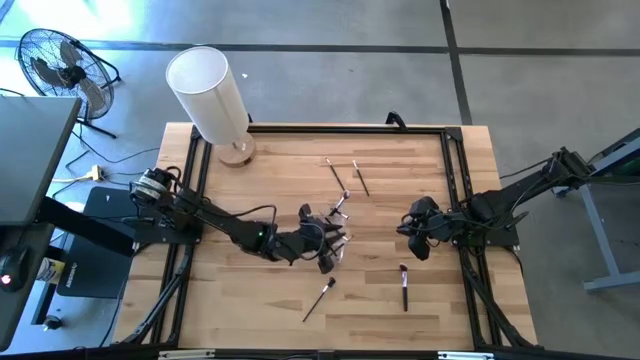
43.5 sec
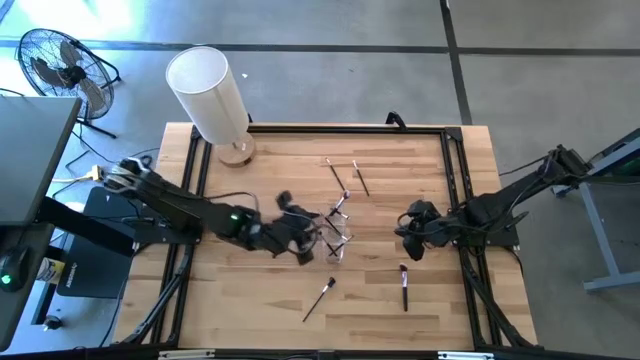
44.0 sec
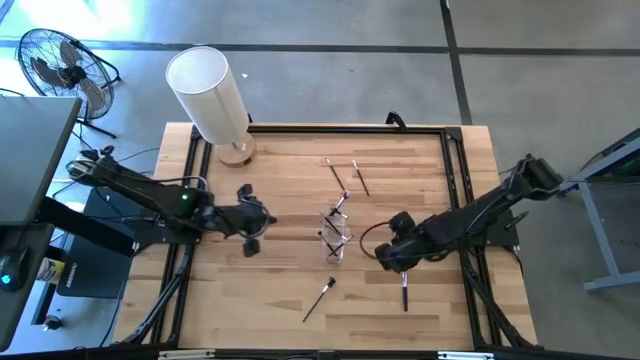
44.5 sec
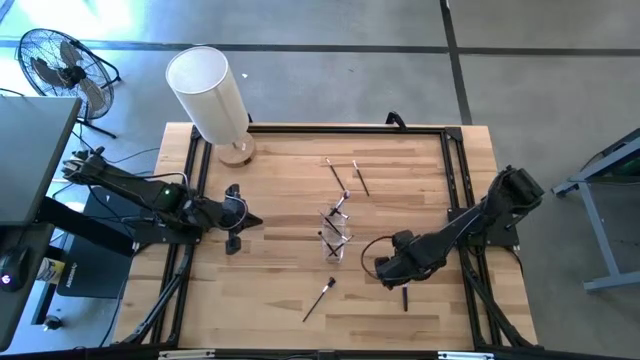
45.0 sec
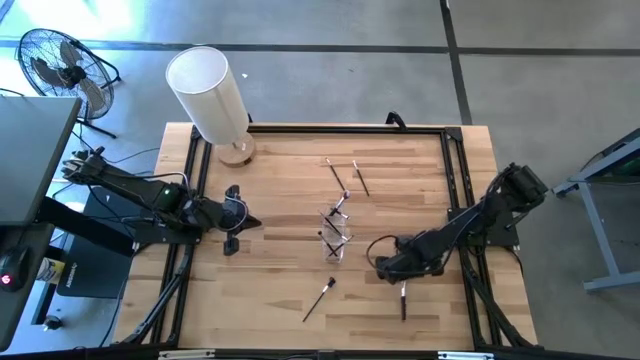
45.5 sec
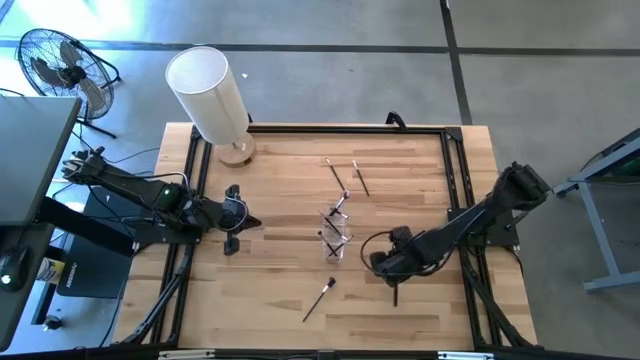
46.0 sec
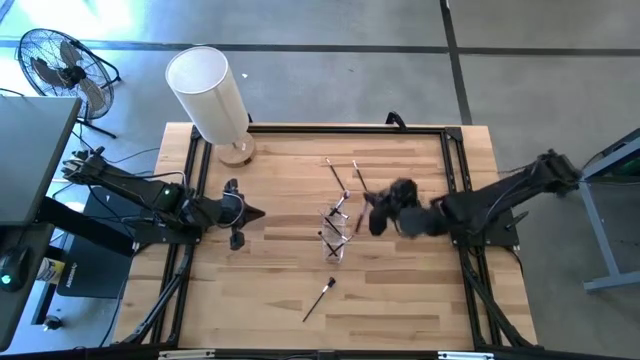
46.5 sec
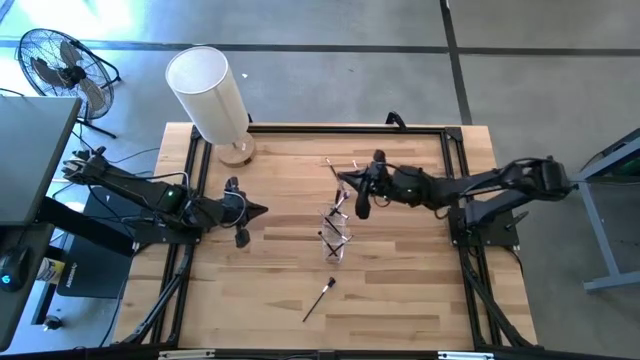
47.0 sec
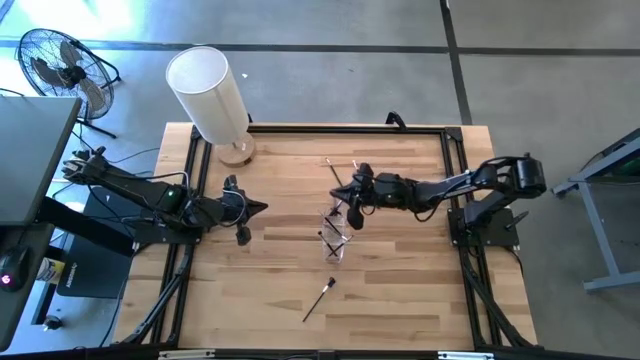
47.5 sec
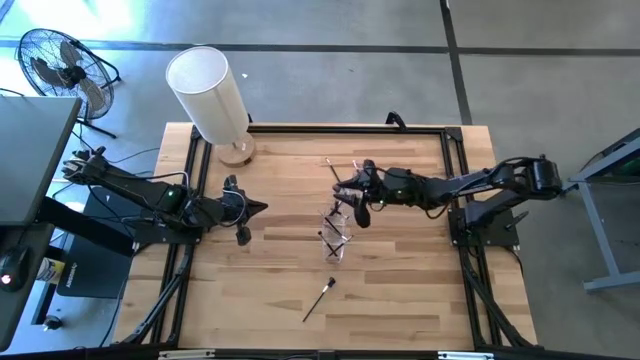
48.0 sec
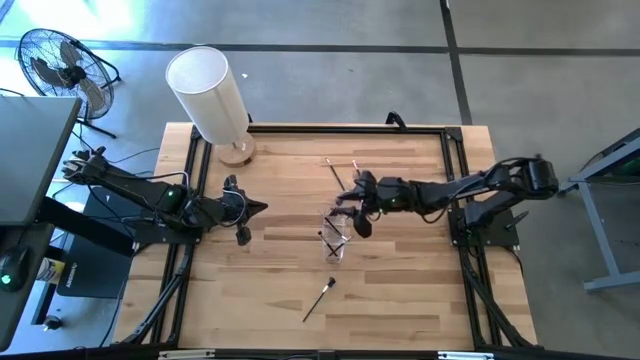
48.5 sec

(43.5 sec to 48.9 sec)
Task: Pick & Place Makeup Brushes
Put the powder brush into the transparent organizer

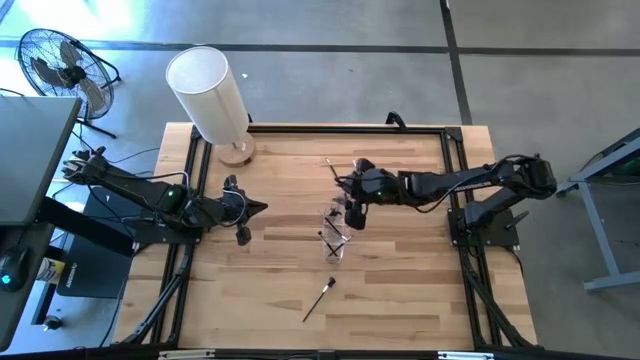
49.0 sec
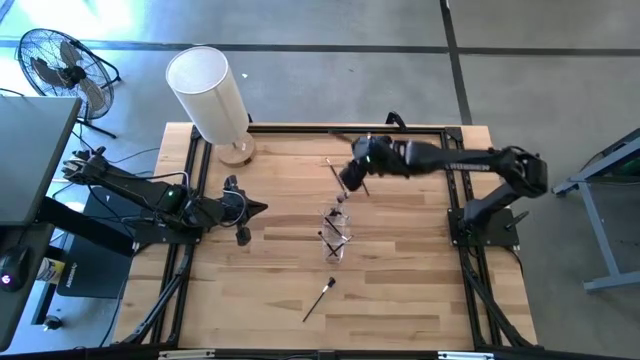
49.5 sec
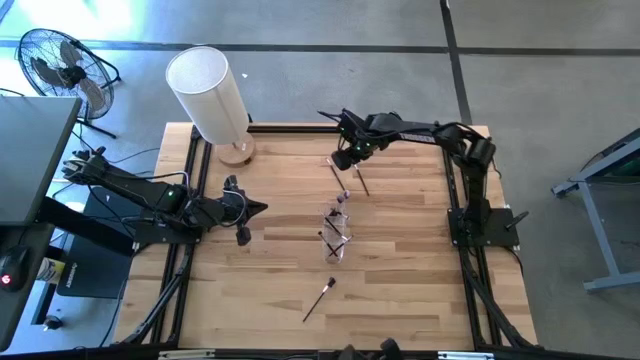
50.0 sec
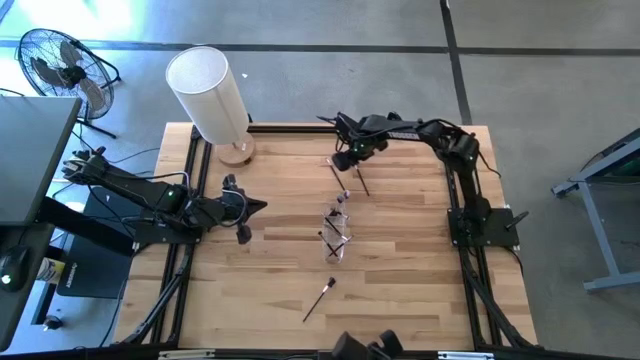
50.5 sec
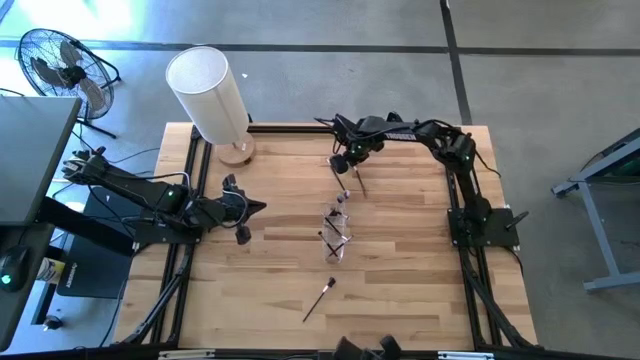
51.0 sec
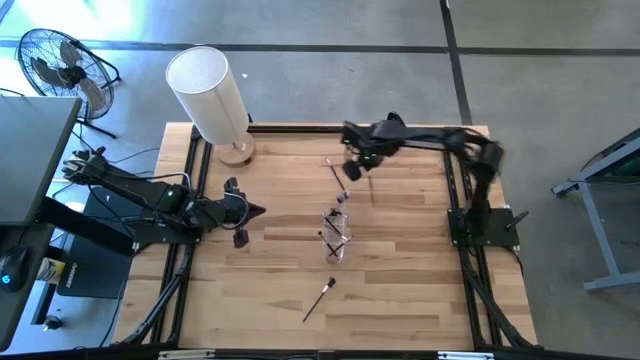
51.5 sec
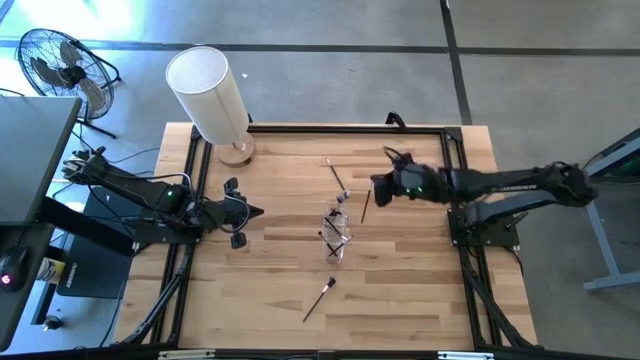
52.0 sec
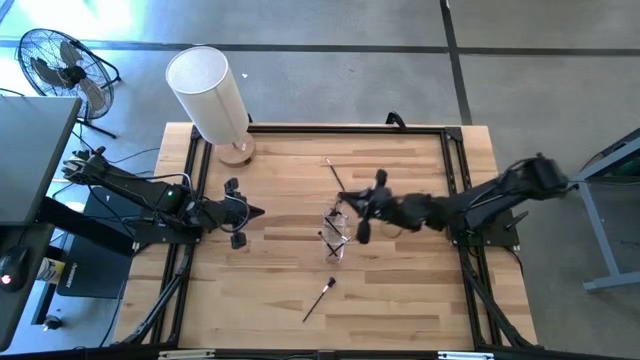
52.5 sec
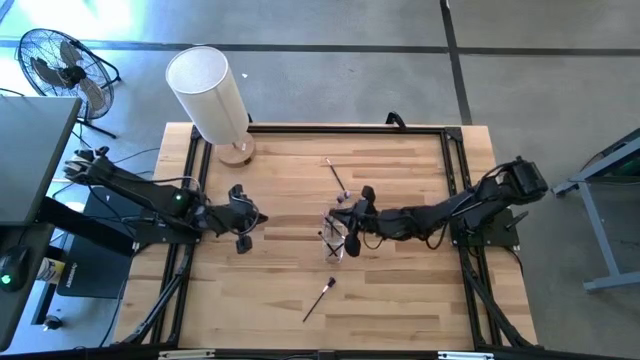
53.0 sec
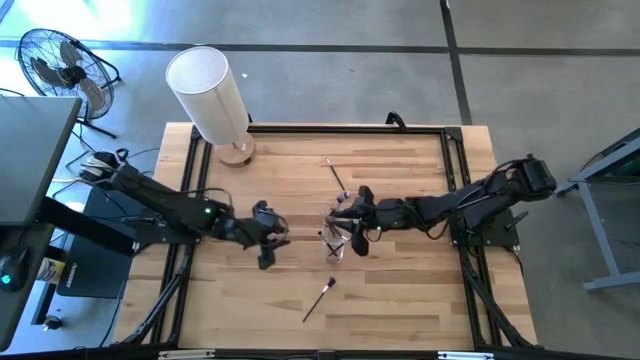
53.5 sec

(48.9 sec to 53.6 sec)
Put the eyeshadow brush into the transparent organizer

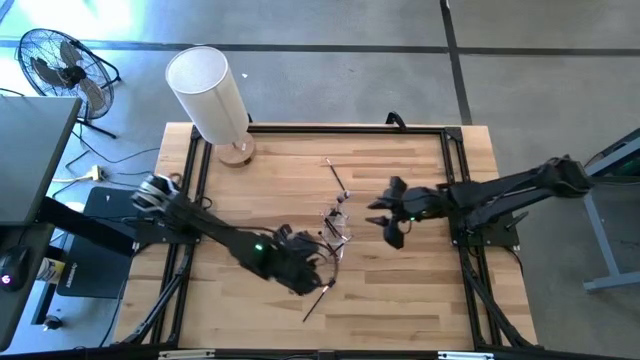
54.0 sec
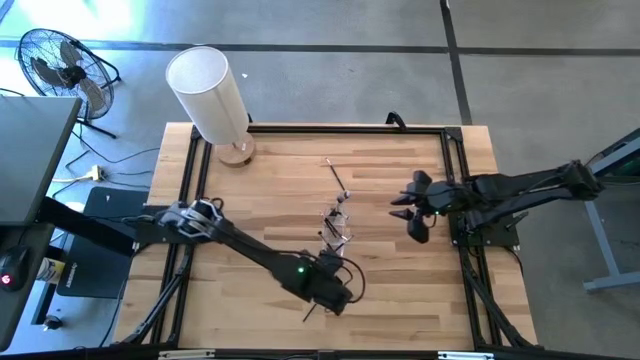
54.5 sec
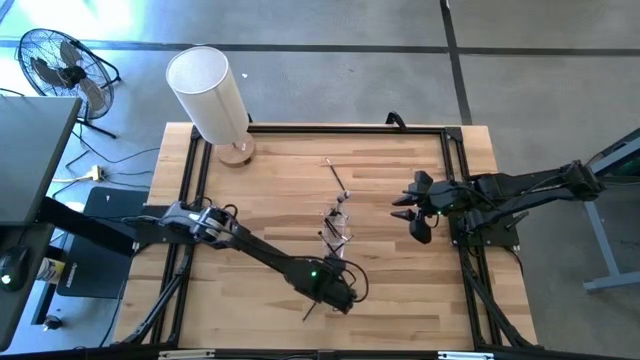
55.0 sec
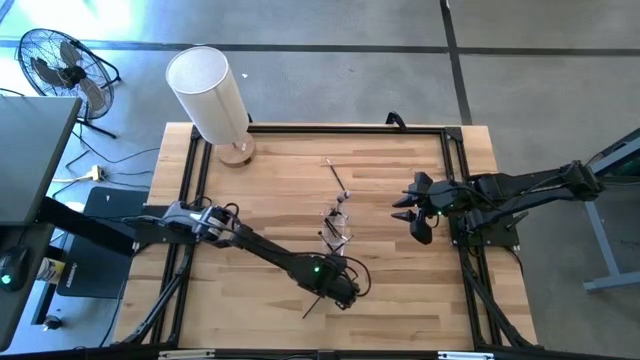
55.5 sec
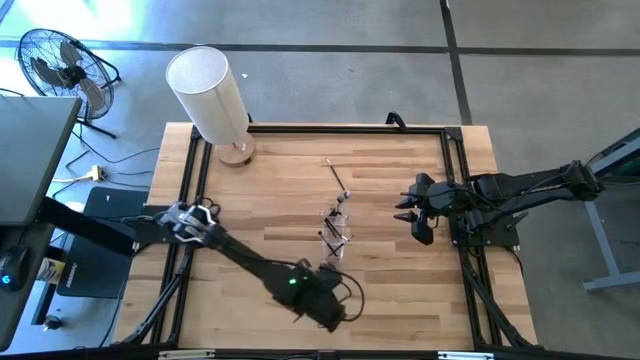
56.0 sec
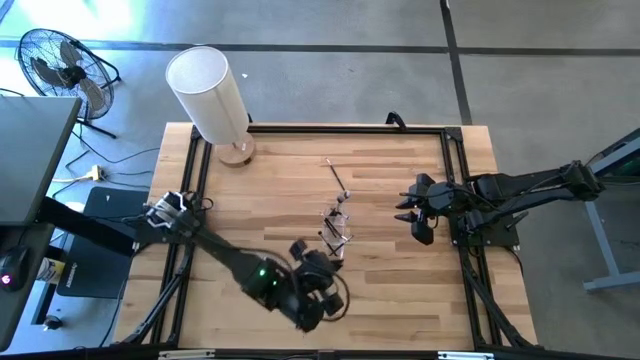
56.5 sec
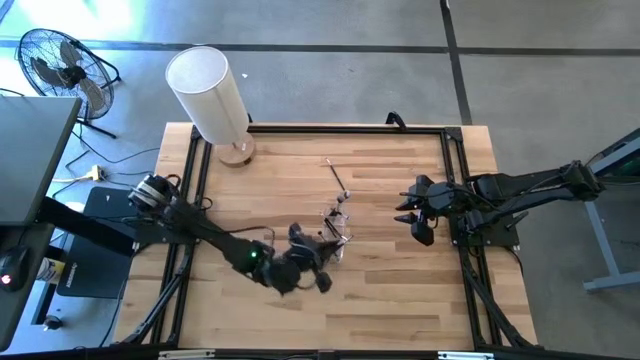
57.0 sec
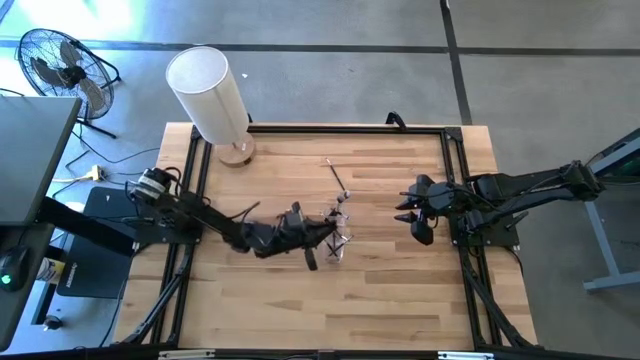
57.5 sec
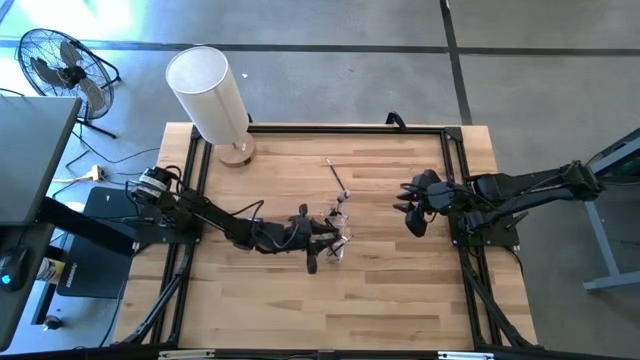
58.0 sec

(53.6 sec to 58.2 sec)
Put the lash brush into the transparent organizer

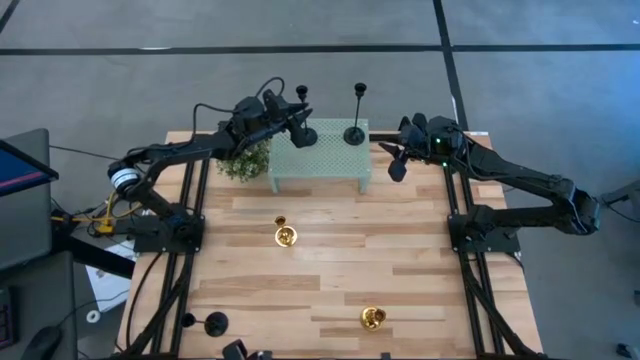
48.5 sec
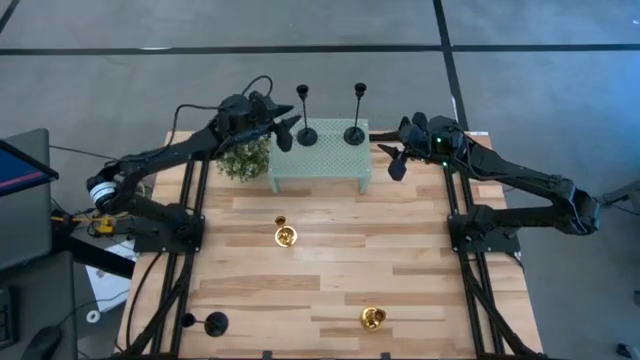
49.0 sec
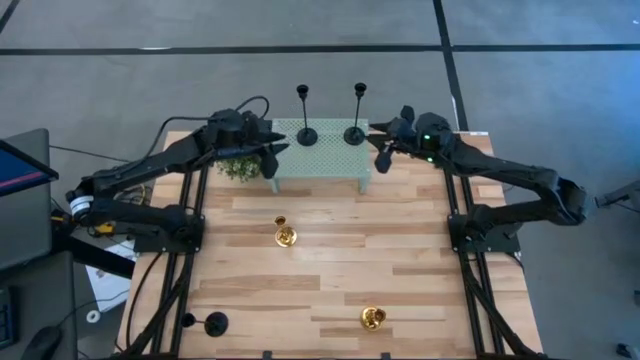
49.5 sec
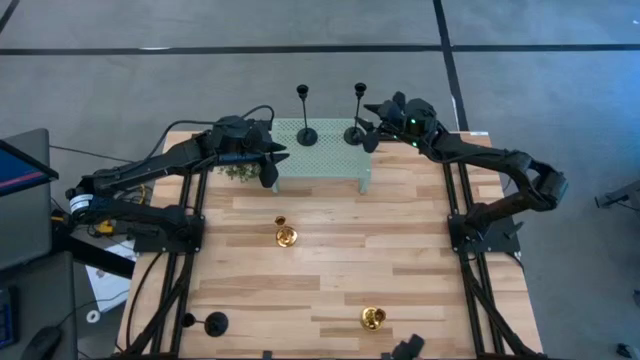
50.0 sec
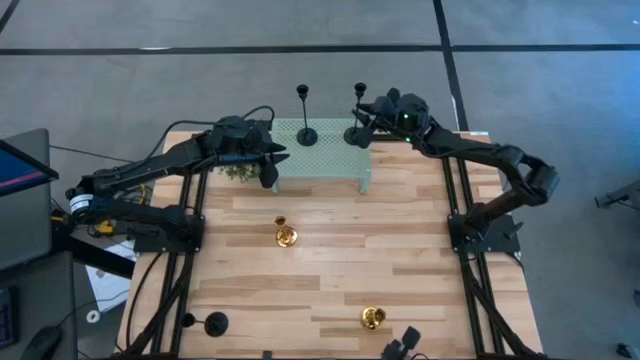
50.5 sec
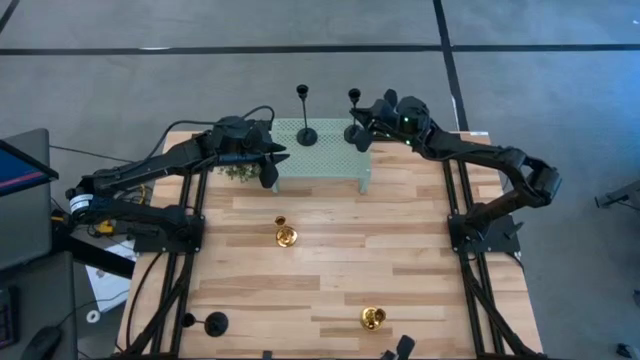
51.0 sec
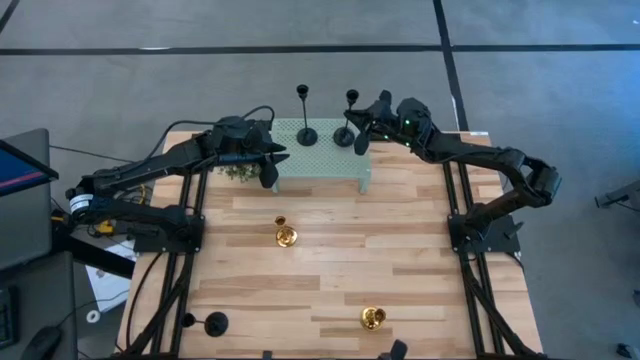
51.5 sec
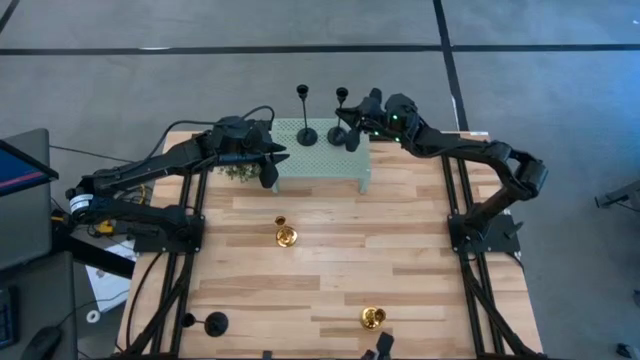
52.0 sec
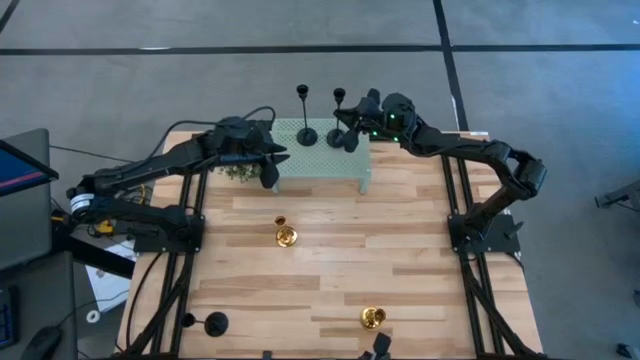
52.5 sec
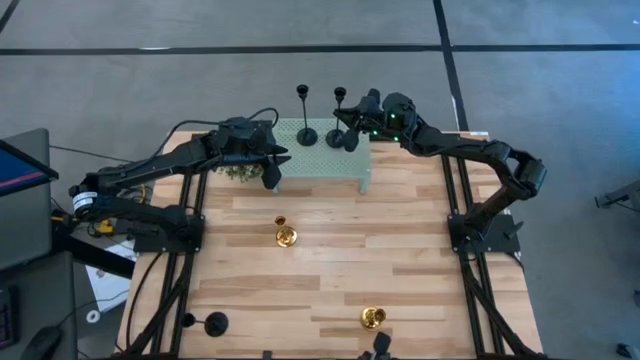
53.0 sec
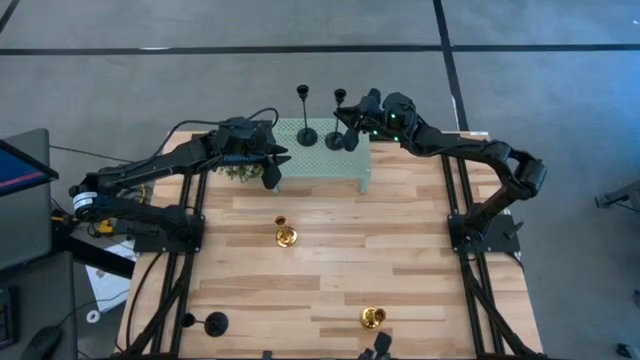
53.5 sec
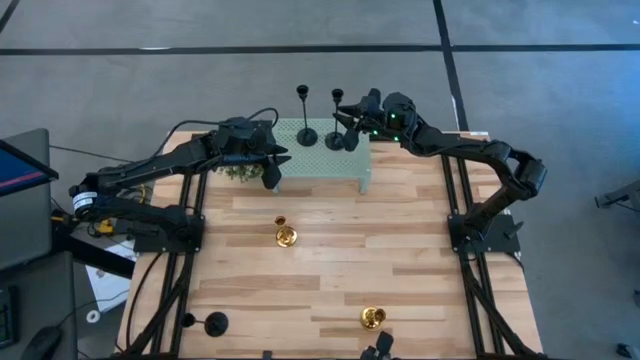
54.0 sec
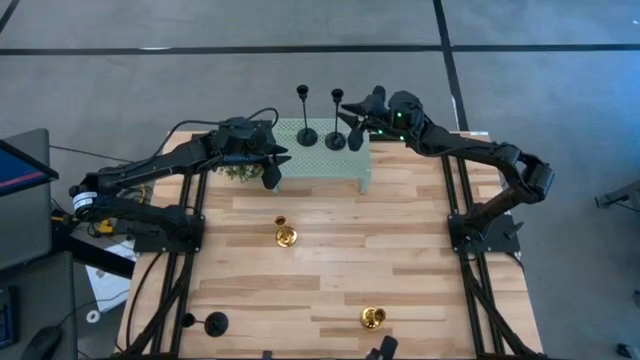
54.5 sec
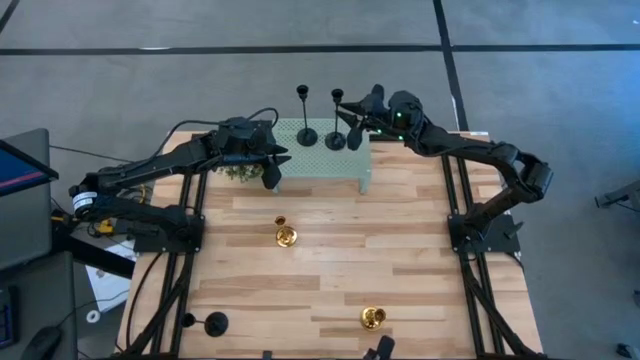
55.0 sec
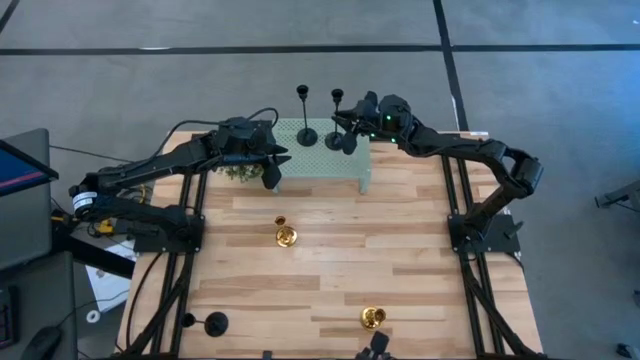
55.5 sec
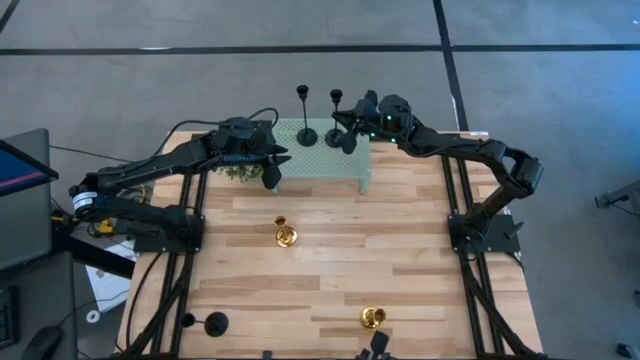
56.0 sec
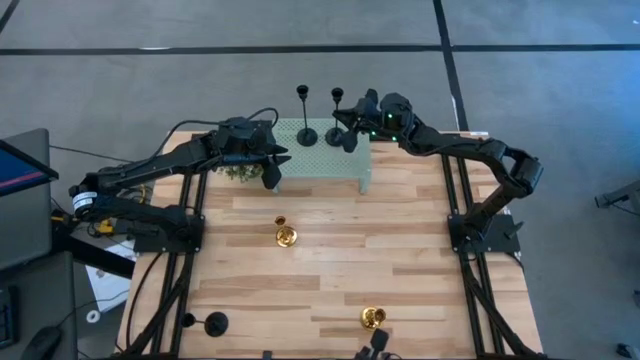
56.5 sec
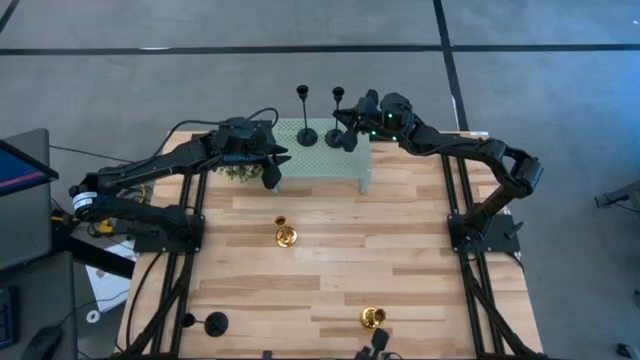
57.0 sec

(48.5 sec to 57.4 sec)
Task: Pick & Place candle stick holders
Adjust the right black candle holder on the shelf
